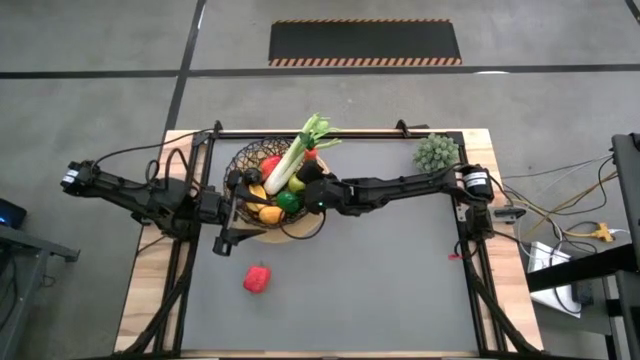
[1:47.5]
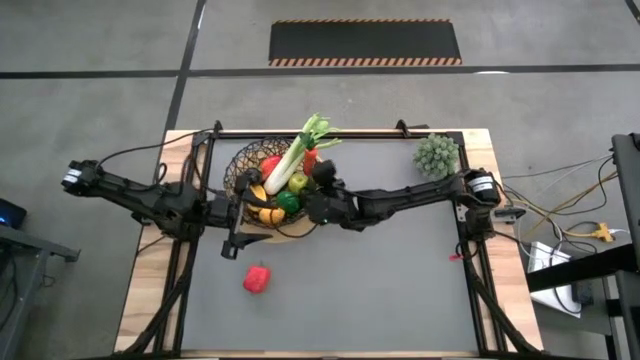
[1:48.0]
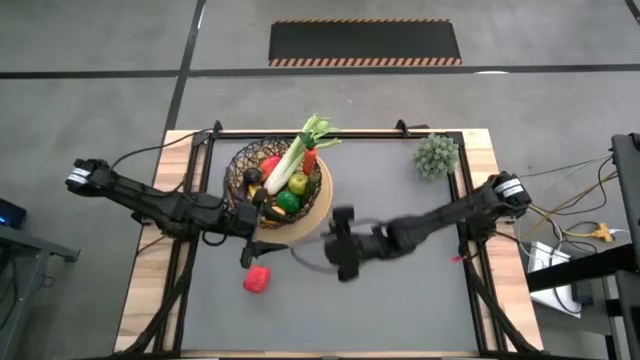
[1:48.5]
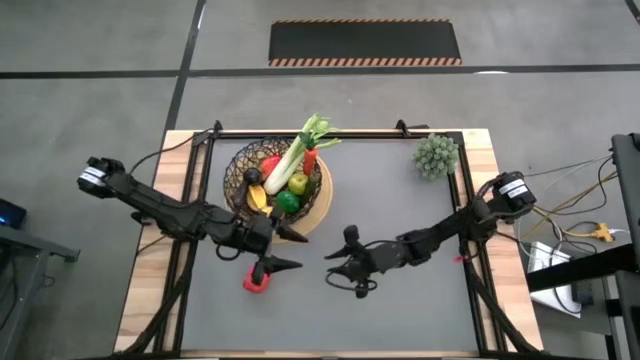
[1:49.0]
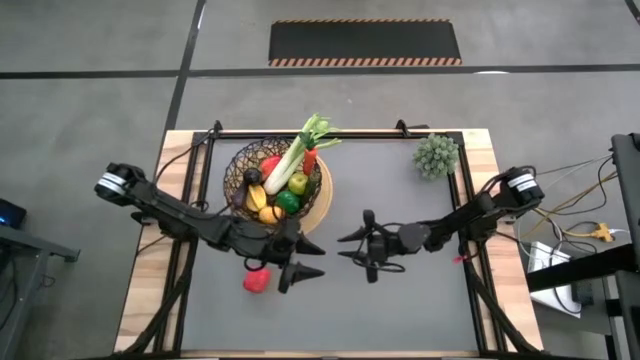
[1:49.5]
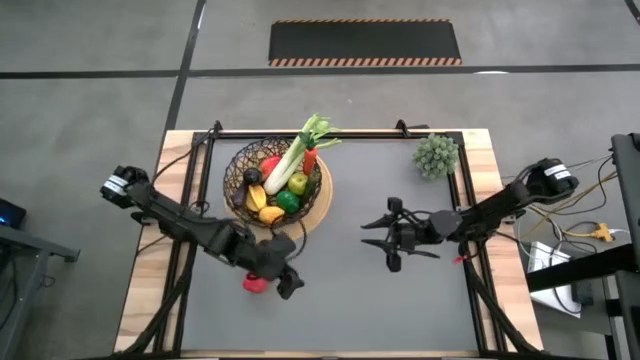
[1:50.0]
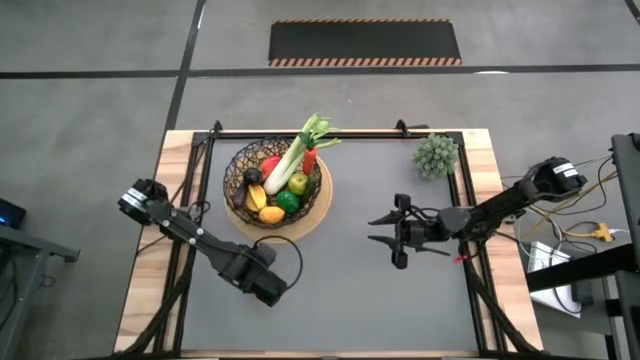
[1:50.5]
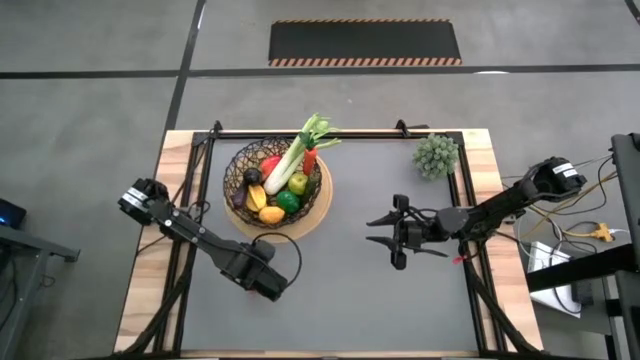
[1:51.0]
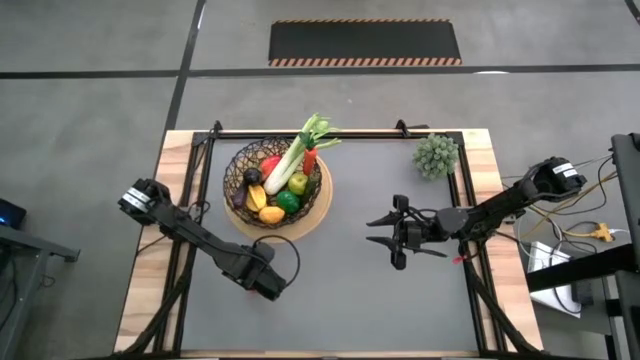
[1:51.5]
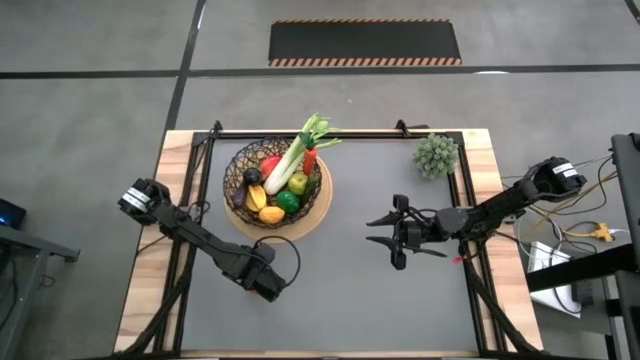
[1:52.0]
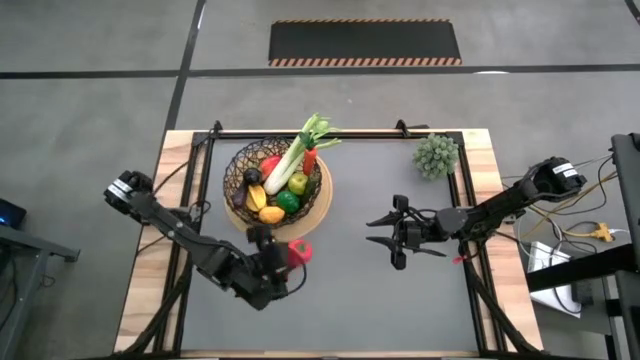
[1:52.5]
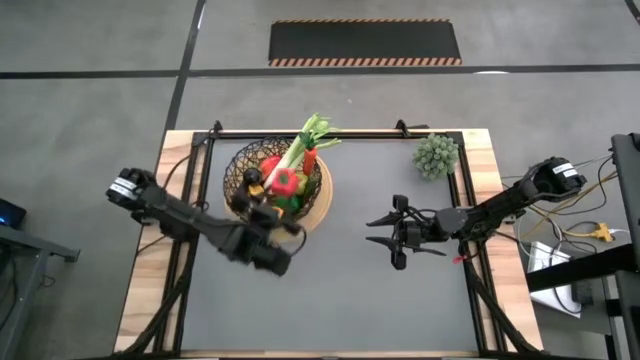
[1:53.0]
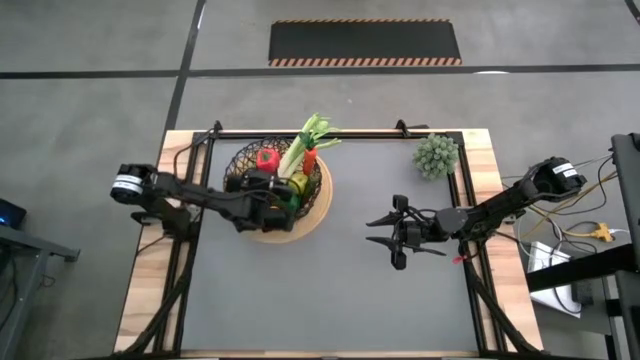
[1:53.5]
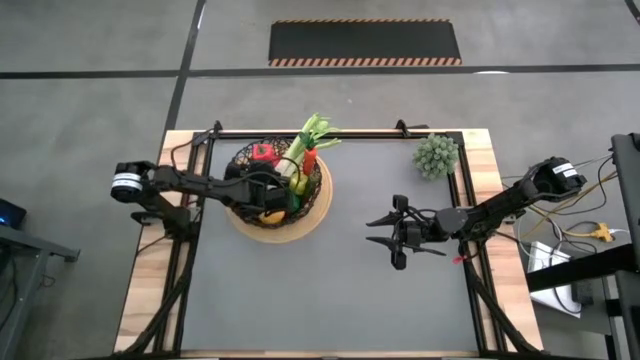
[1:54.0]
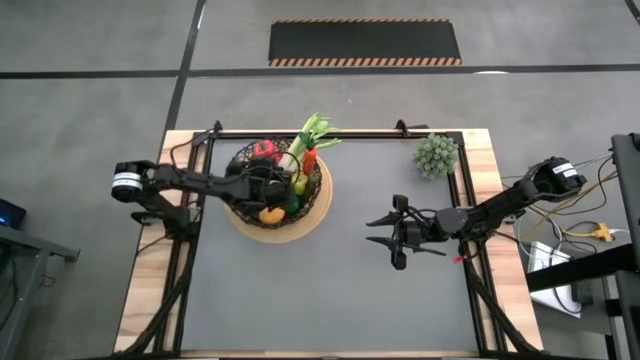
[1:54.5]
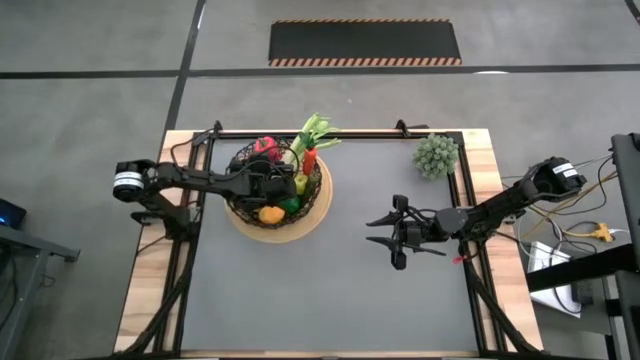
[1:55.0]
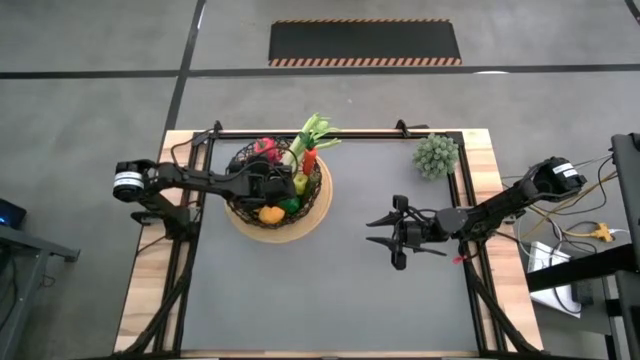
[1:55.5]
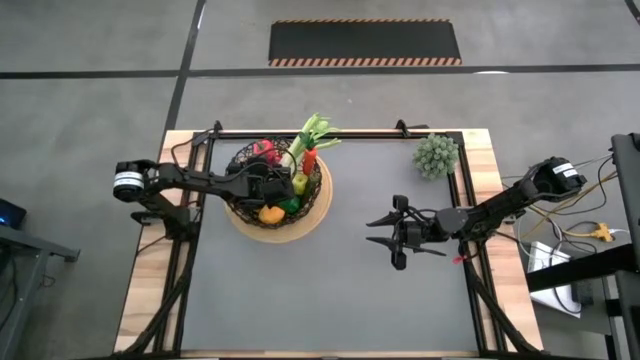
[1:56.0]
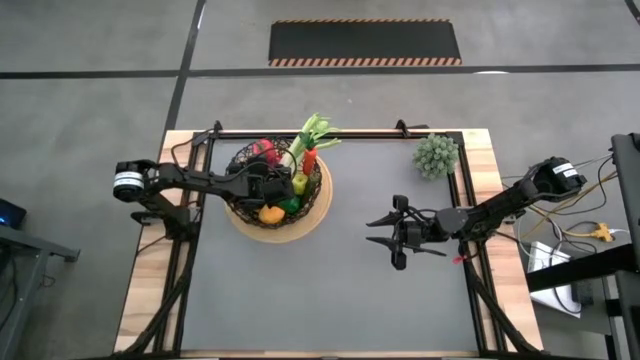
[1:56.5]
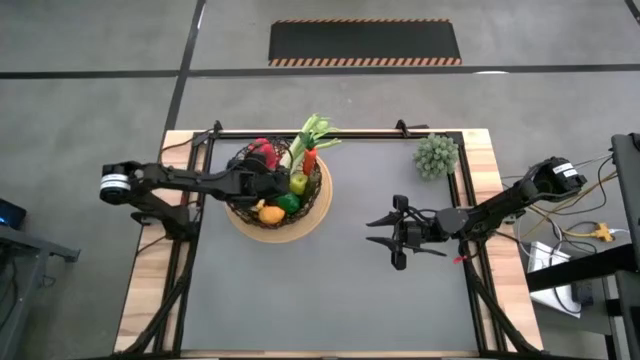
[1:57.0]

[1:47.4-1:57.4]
Task: Build produce basket
Put the red bell pepper into the black wire basket

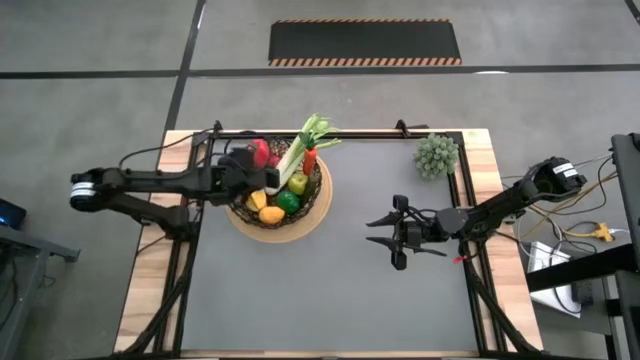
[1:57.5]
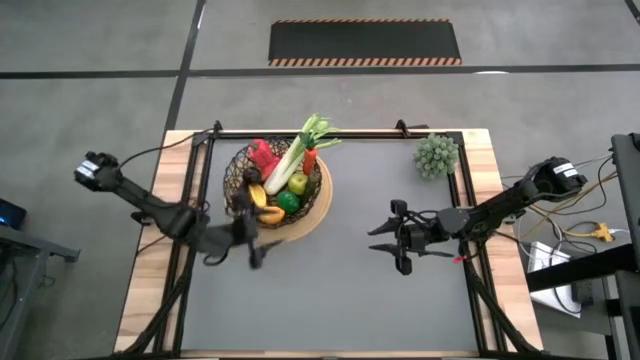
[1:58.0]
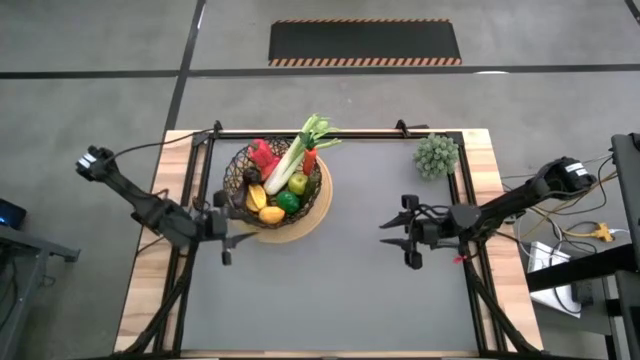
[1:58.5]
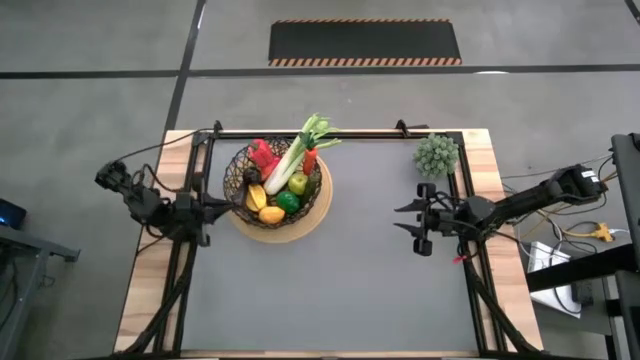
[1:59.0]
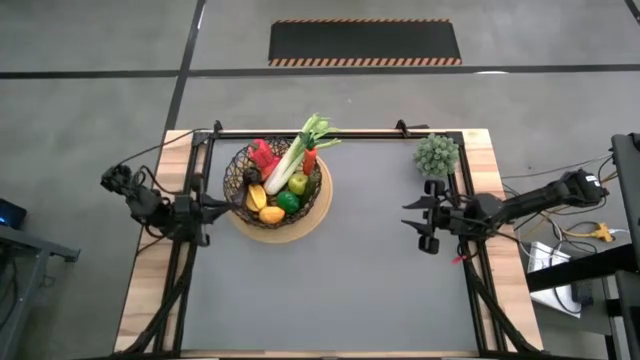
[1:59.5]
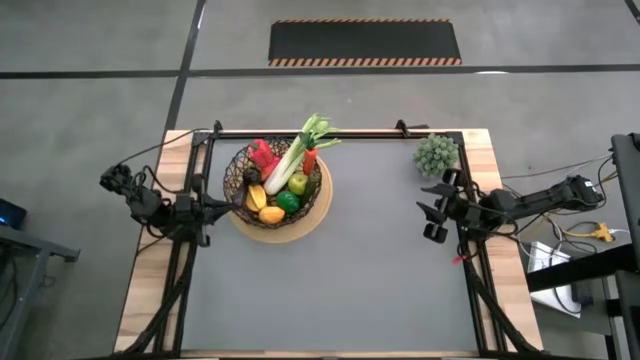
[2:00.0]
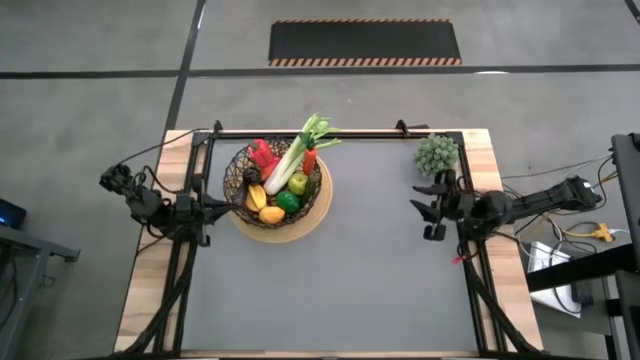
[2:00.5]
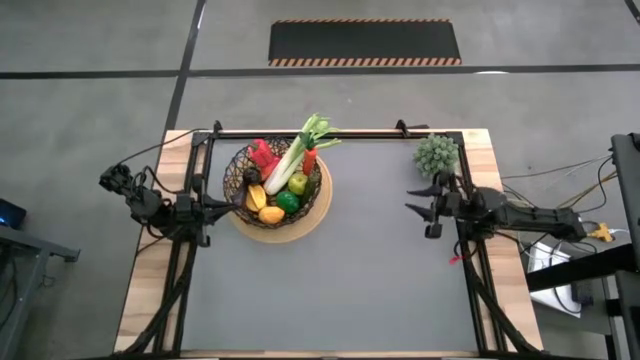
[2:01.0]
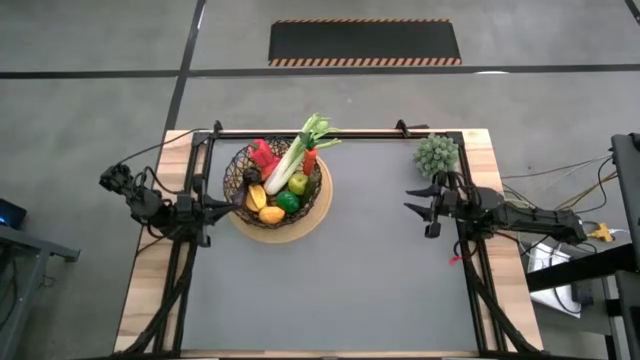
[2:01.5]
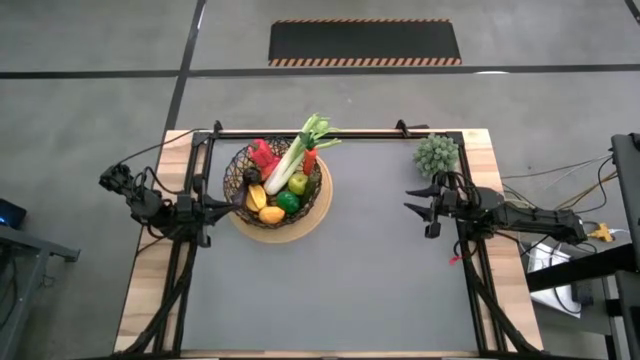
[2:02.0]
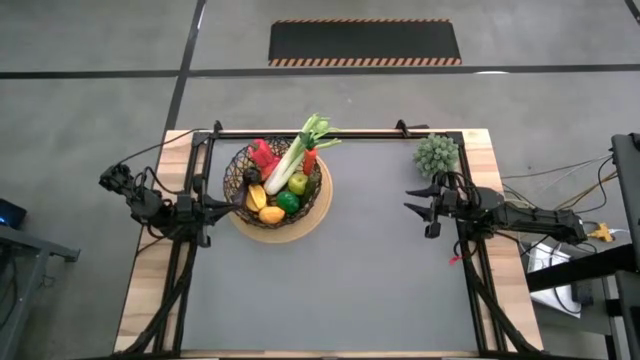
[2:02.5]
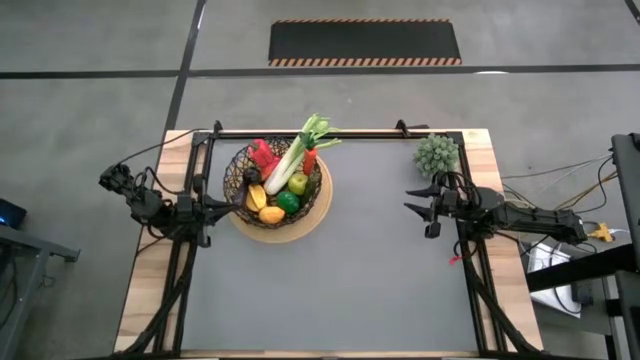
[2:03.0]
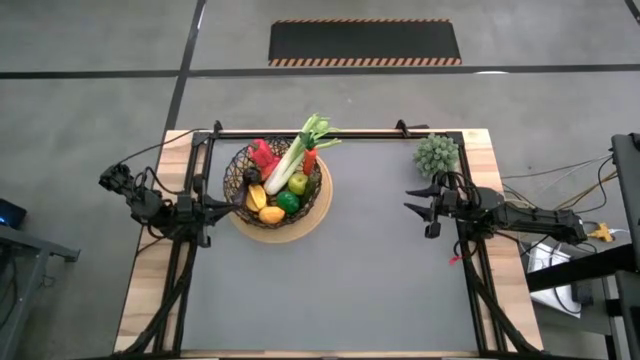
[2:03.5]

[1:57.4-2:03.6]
Return to Home Position

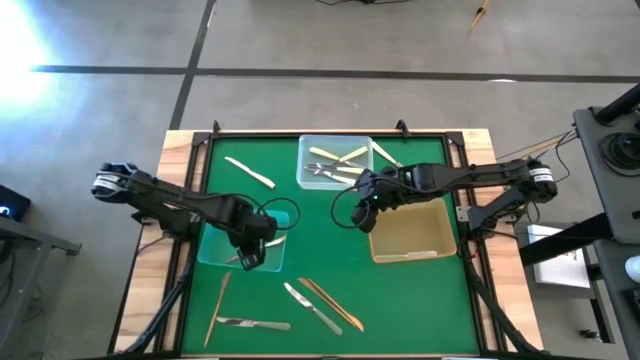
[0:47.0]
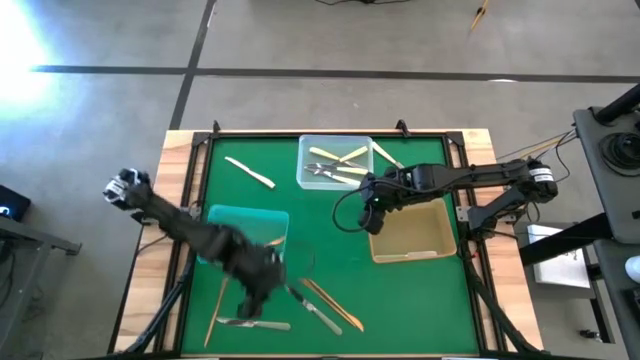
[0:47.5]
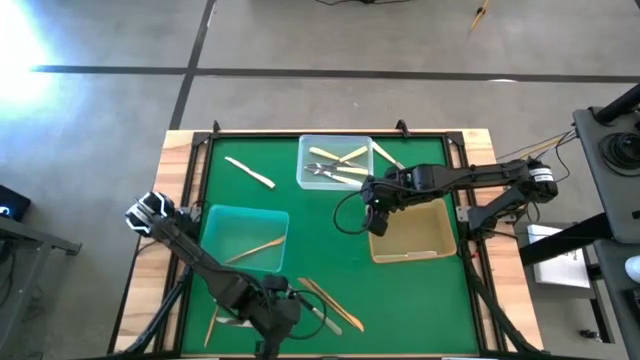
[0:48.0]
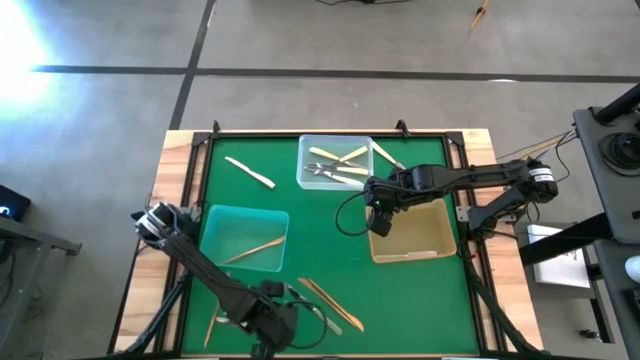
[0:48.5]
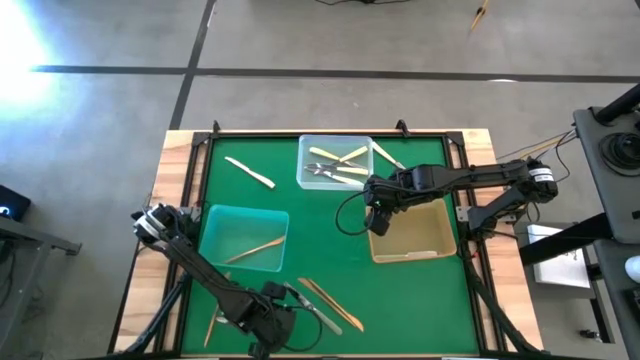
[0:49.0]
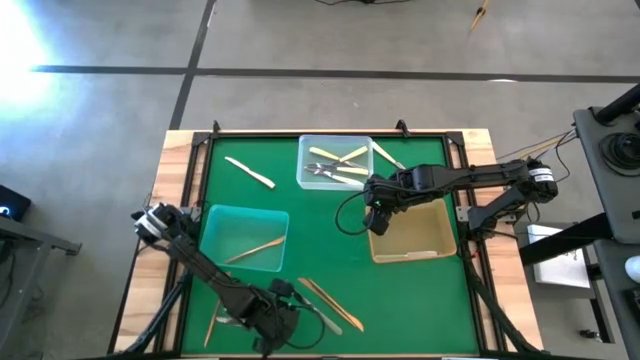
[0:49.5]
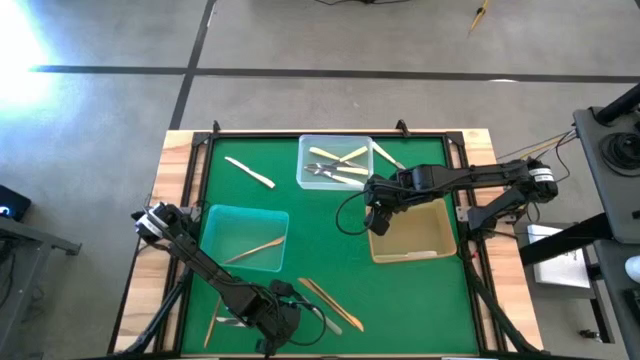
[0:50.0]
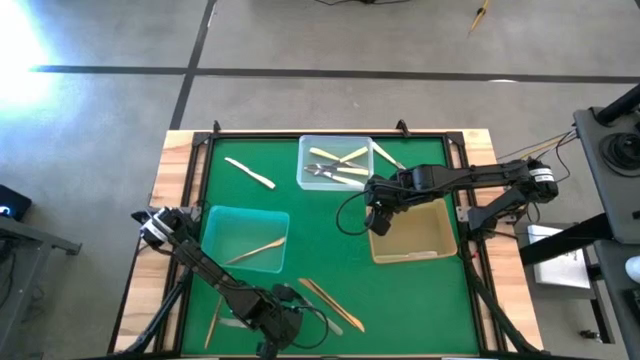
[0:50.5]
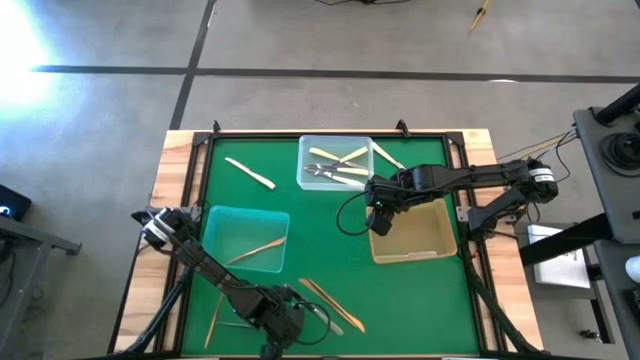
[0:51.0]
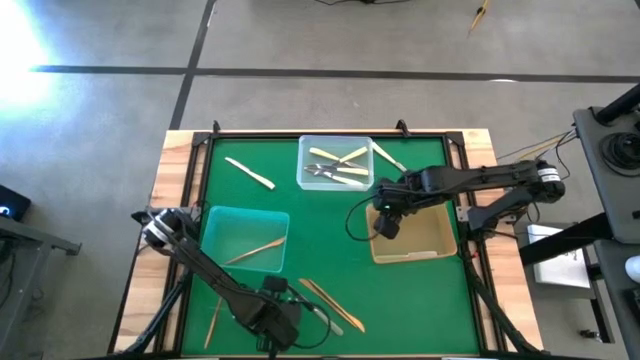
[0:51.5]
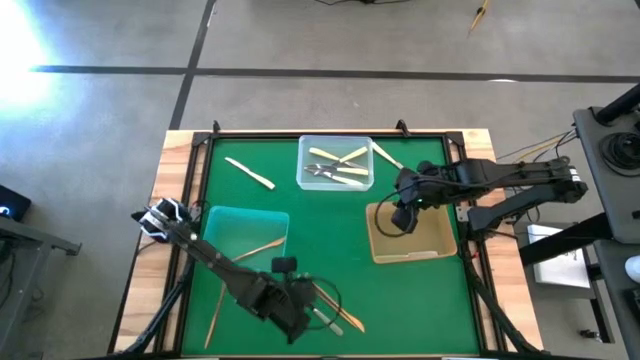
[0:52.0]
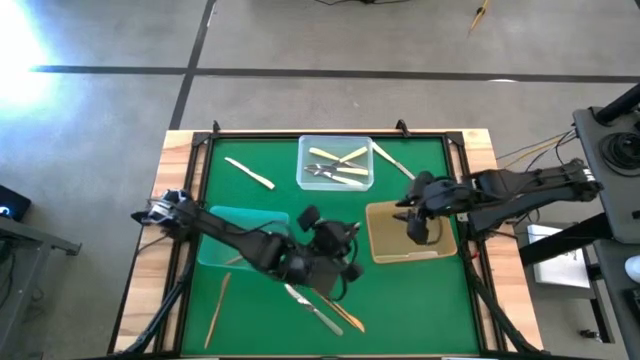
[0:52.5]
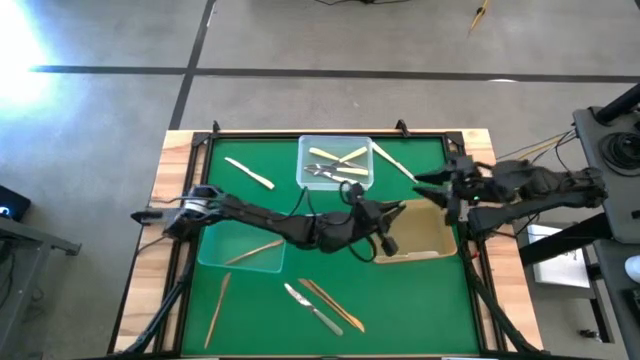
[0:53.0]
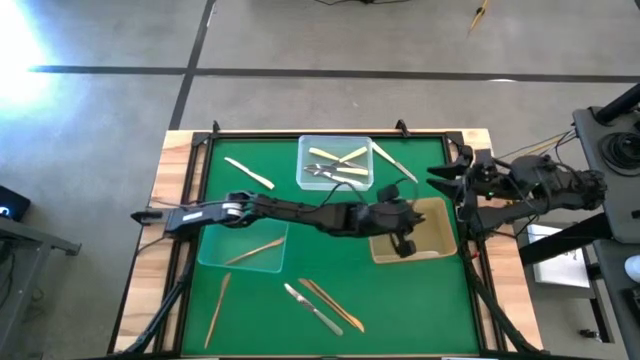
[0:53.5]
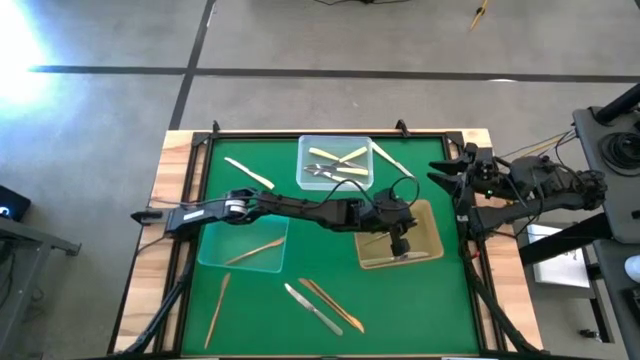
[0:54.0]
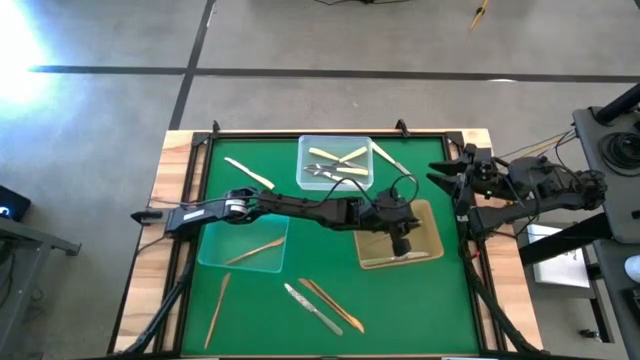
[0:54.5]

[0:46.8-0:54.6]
Task: Sort silverware by color (type)
Put the gray knife into the orange bin
